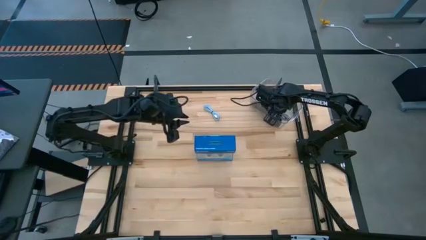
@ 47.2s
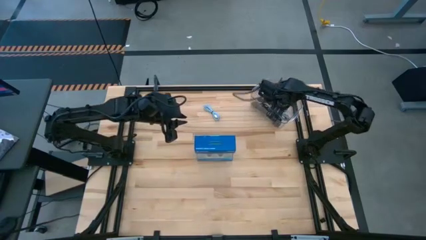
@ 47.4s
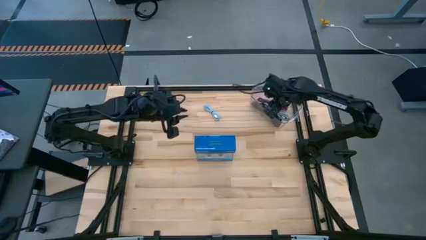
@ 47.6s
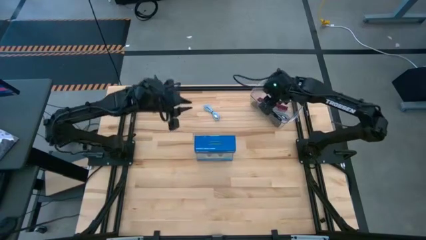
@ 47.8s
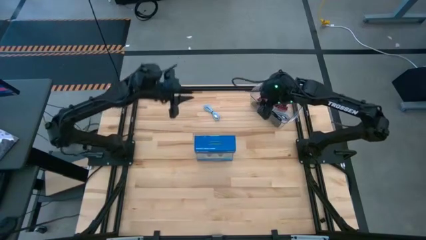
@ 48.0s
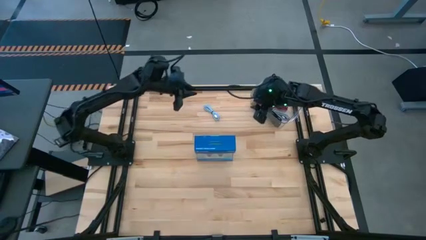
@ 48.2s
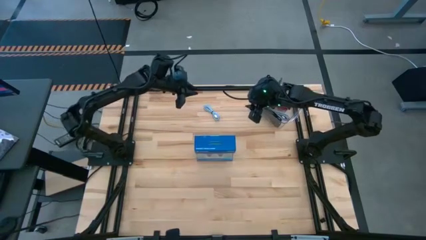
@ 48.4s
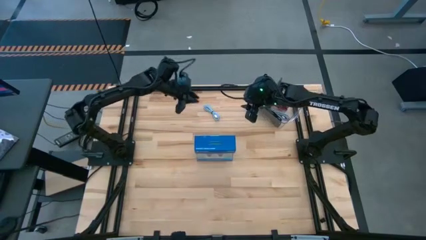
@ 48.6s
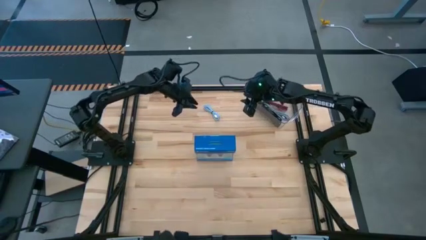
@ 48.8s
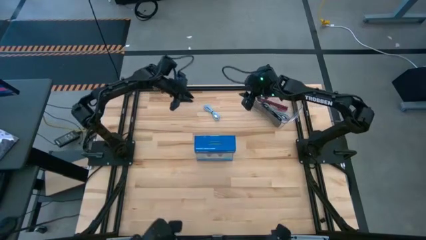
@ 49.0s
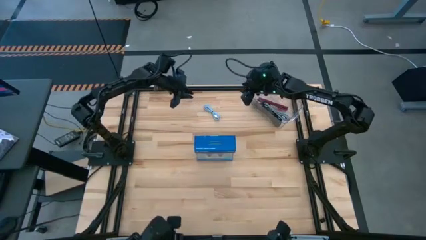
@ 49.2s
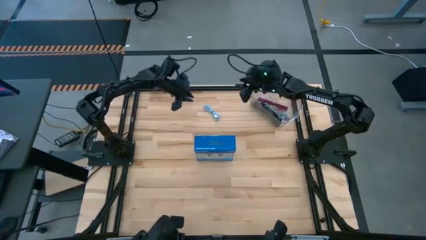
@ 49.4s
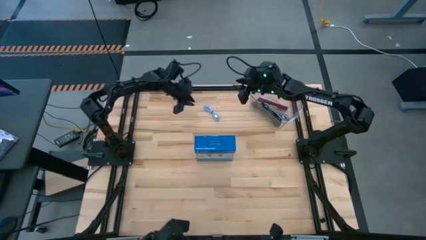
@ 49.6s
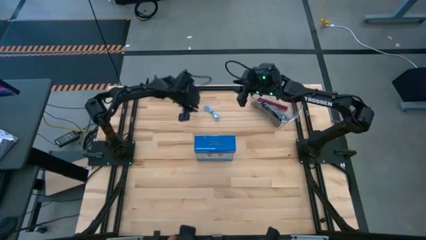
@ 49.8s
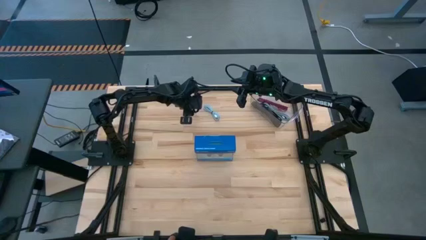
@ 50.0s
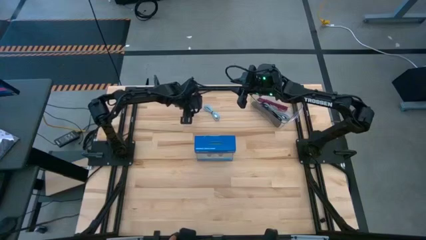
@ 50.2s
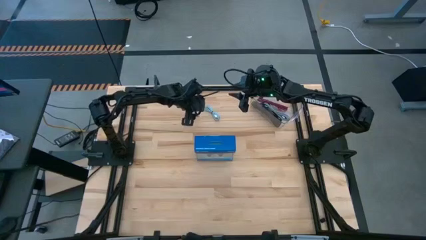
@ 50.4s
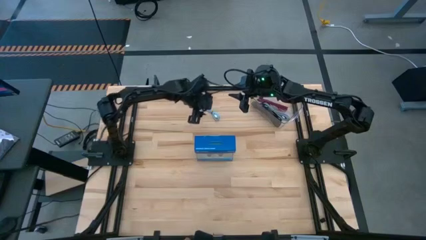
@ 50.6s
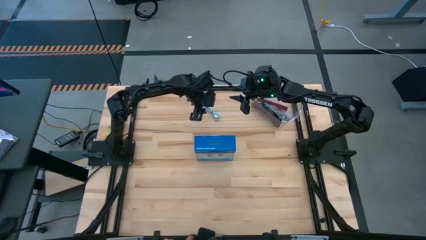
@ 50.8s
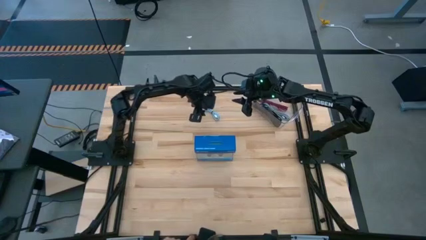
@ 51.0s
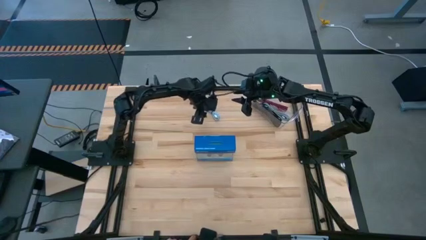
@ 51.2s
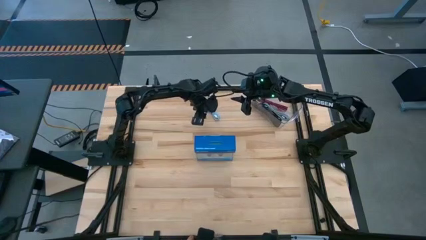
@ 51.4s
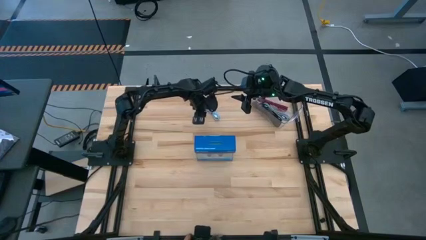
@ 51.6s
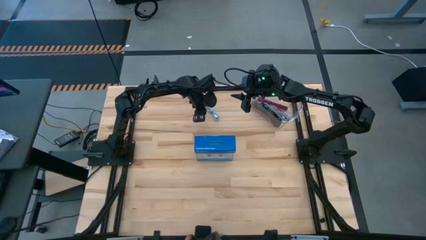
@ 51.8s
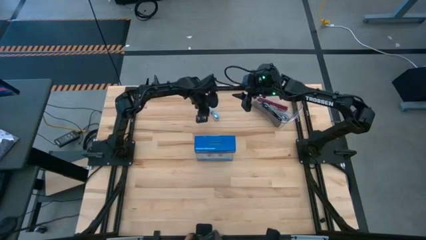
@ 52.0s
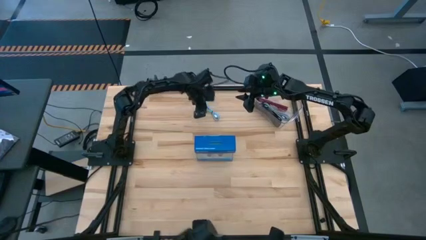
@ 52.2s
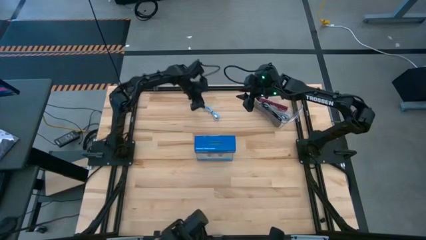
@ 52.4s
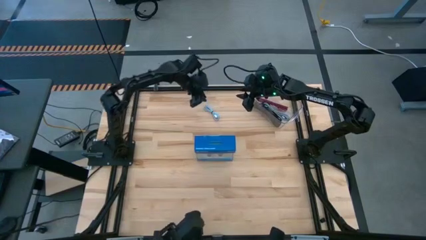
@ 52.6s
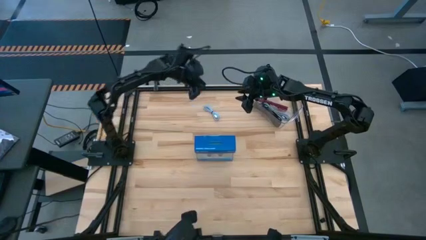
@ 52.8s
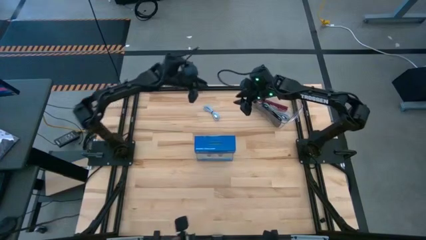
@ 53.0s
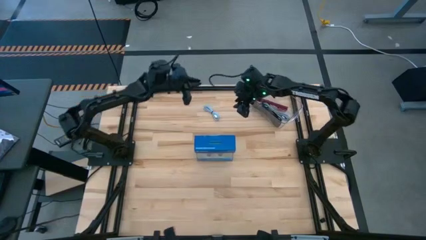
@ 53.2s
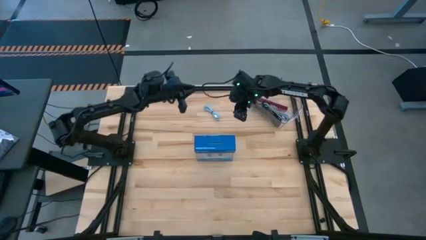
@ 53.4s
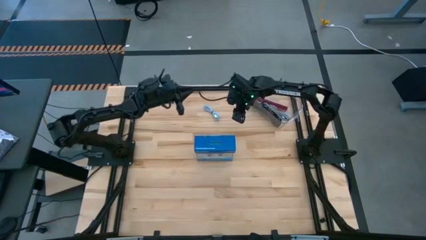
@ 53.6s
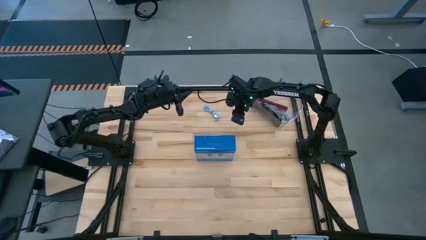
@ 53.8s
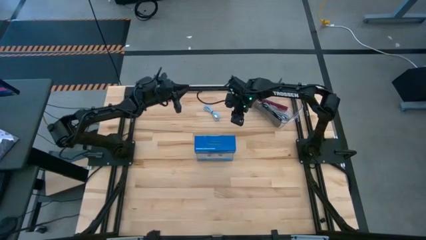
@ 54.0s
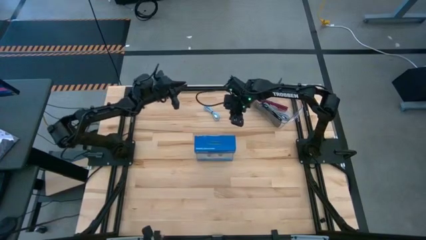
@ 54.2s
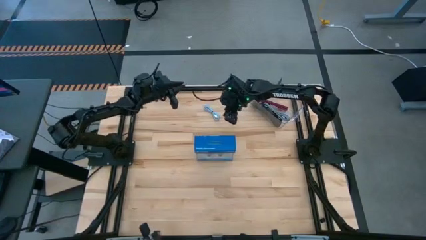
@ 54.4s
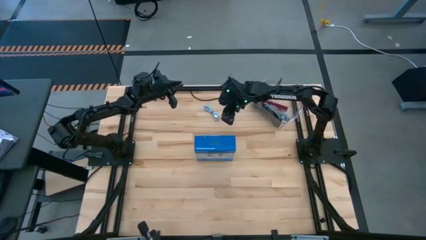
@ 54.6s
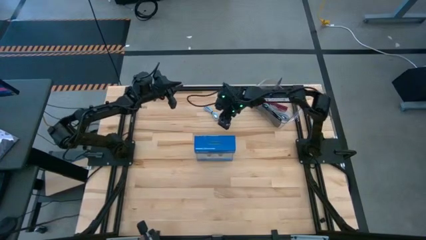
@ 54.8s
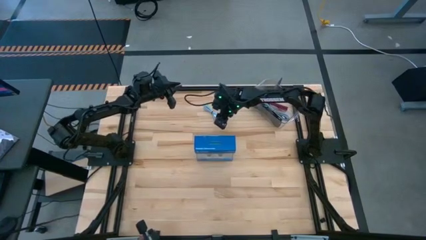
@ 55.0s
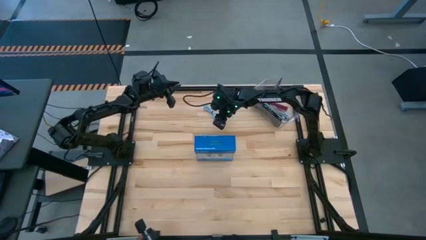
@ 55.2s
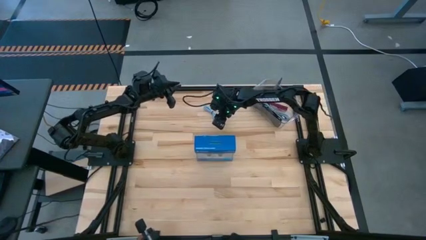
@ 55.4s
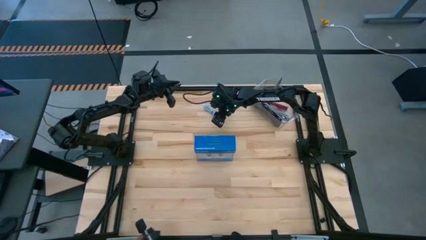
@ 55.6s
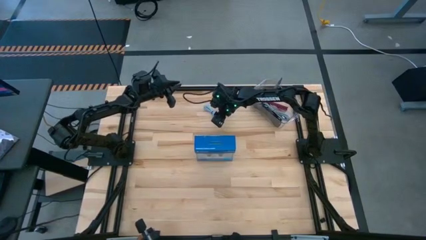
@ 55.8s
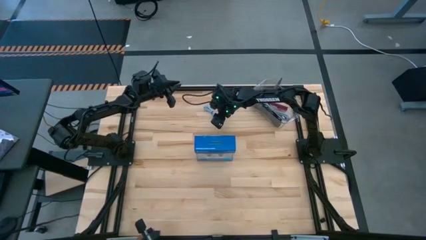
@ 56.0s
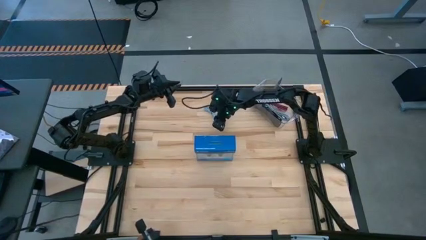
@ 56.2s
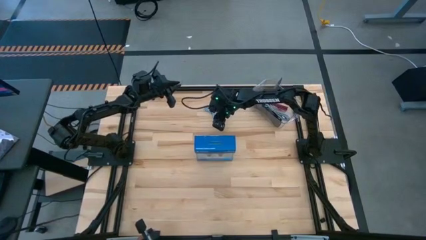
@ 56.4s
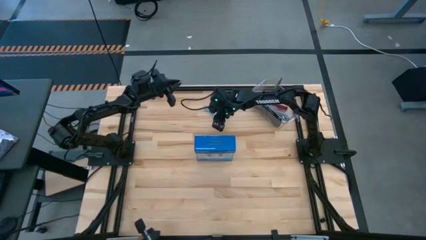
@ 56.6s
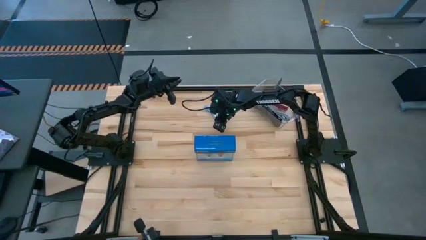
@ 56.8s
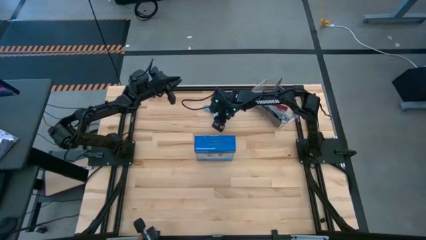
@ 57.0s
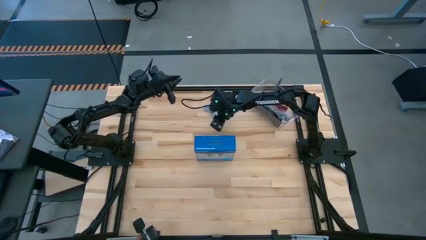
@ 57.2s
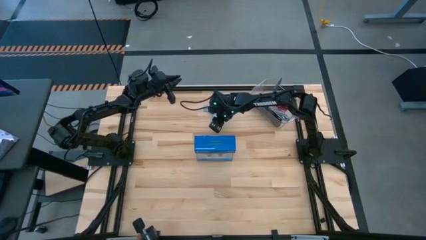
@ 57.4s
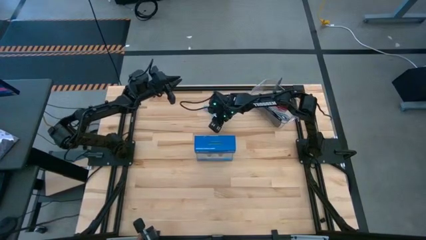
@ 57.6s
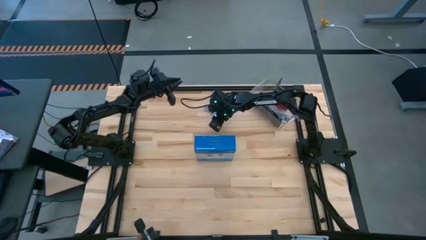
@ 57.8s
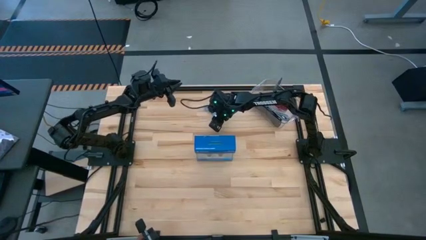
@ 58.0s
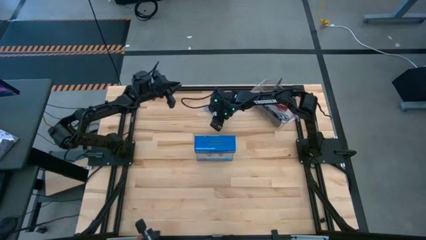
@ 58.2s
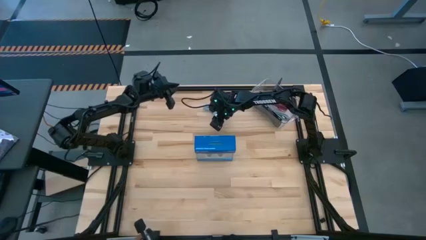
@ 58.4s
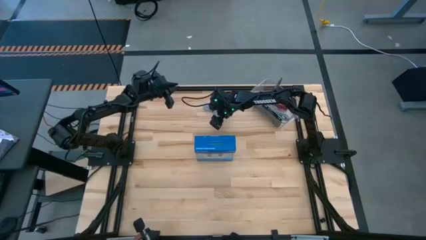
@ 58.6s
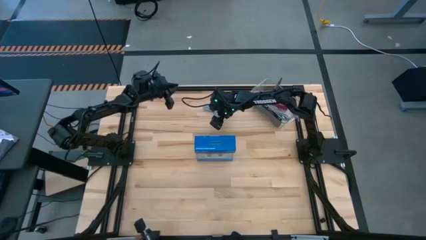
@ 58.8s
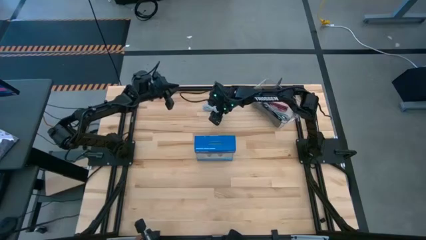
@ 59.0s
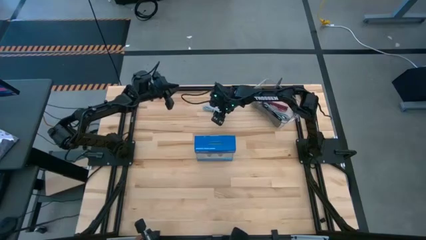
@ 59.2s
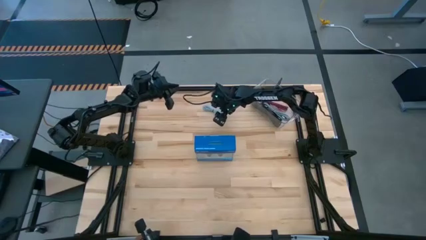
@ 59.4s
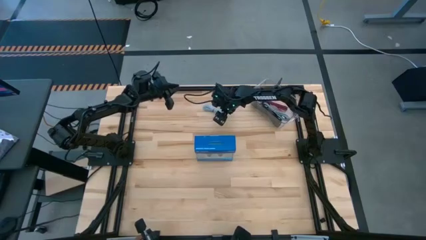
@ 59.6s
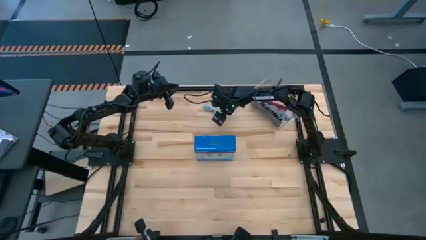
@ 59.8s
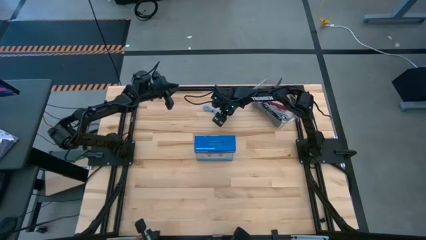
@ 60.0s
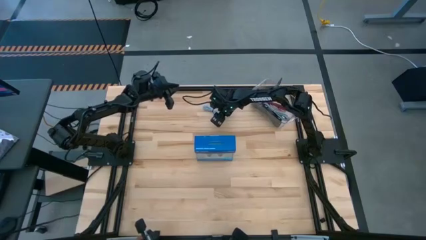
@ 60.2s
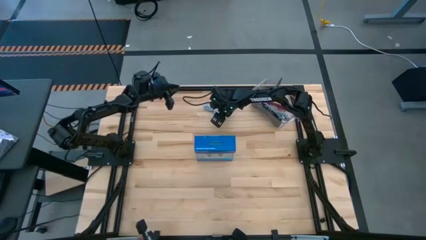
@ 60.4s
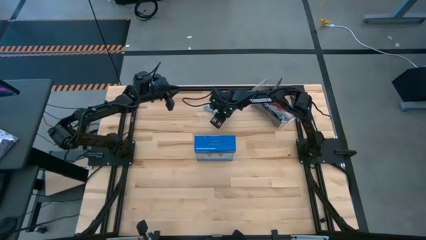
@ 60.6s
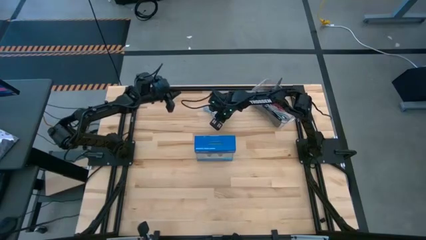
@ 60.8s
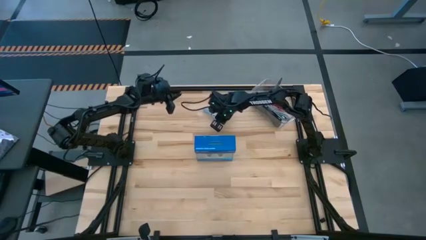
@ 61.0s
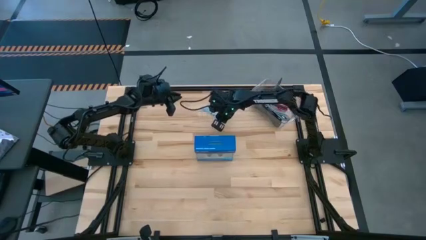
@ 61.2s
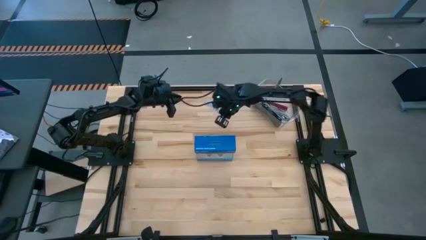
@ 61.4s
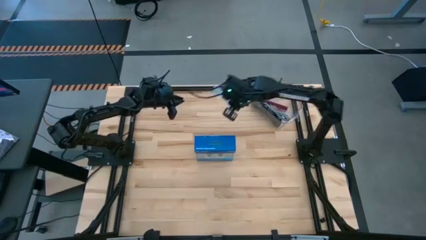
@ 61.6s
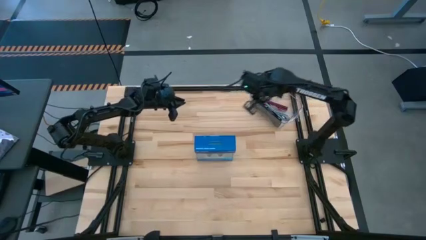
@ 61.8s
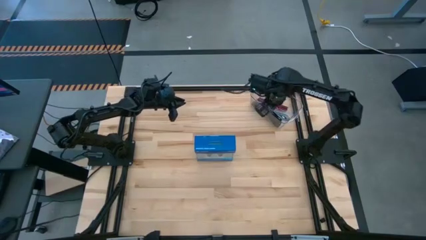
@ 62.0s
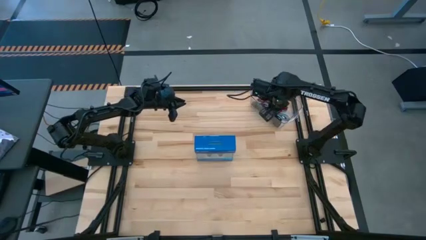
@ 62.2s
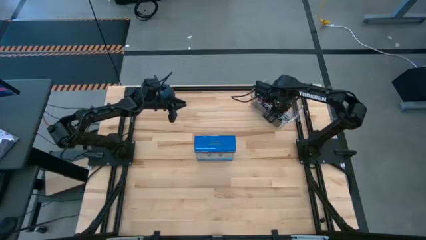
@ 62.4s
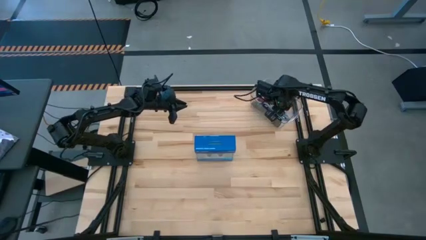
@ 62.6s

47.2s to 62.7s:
Task: Pick and place USB-C Cables
Put the blue charger cable into the container

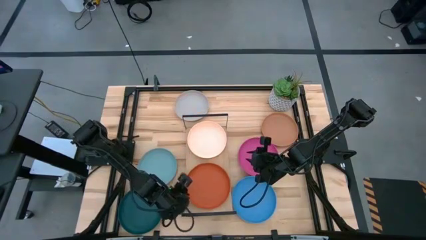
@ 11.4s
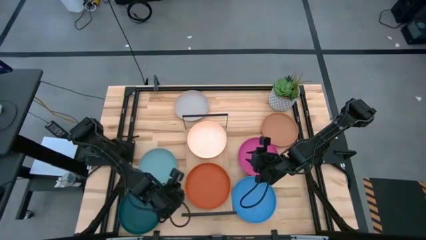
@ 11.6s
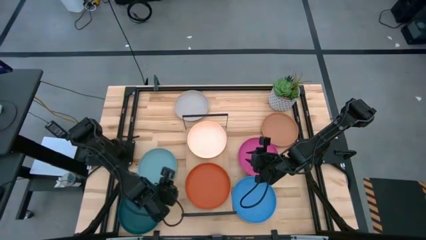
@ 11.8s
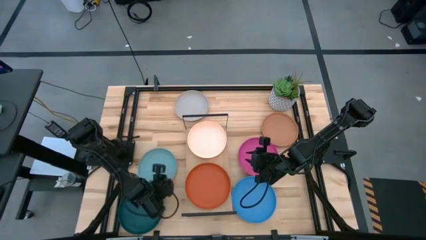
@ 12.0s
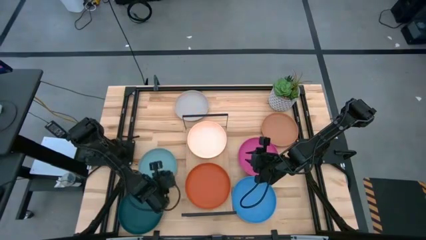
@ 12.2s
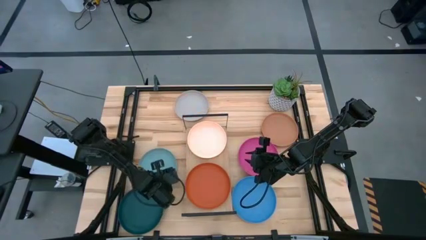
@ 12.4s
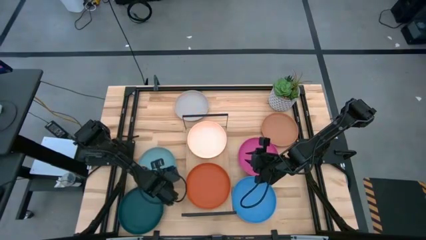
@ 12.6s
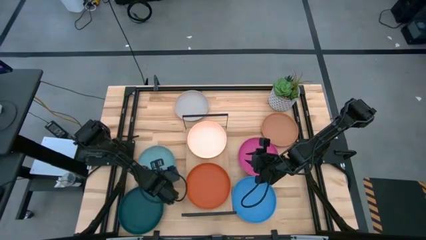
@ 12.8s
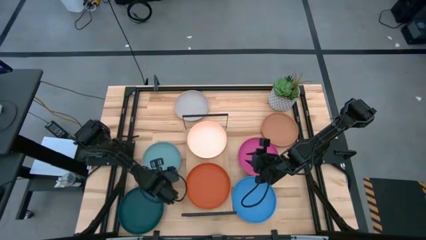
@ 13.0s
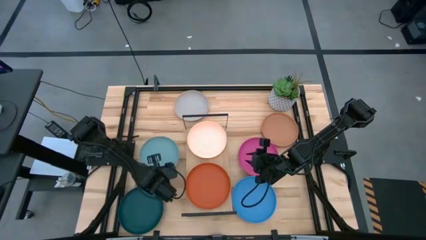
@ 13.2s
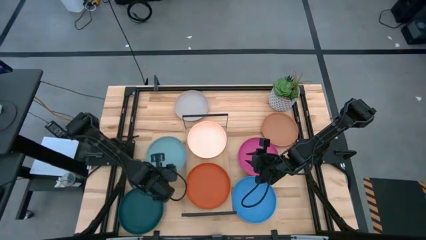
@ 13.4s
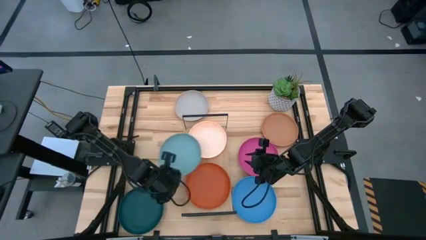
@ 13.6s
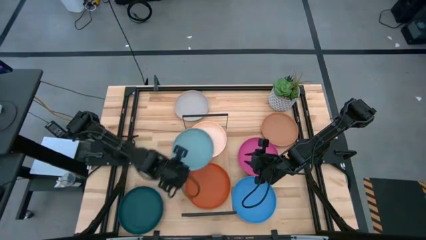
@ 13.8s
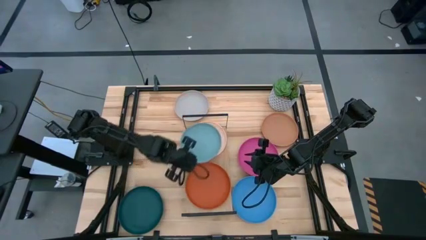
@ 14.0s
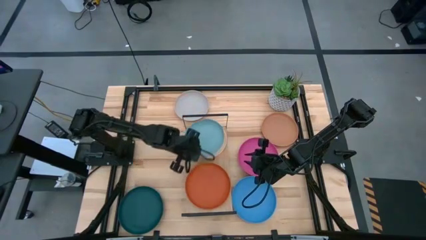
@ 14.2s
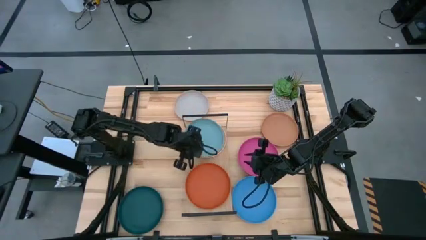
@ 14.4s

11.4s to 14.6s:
Task: Place and stack plates onto a shelf
Stack the light blue plate on top of the light orange plate on the shelf
